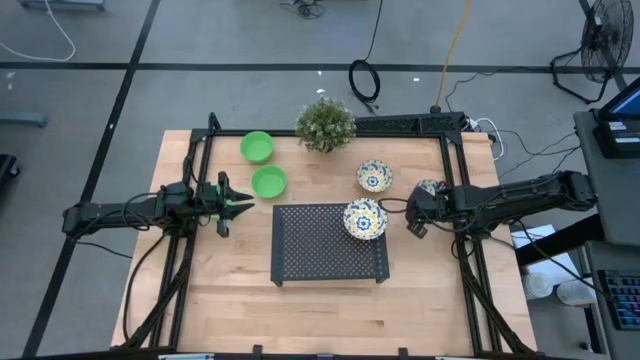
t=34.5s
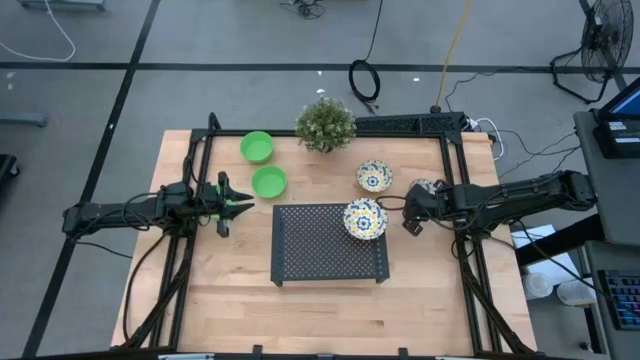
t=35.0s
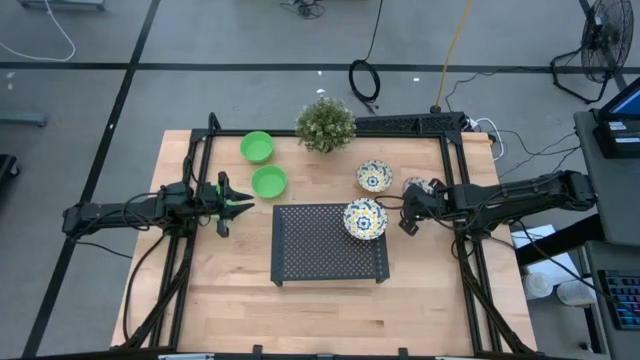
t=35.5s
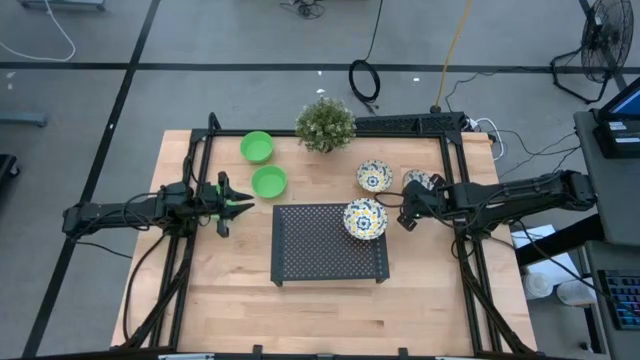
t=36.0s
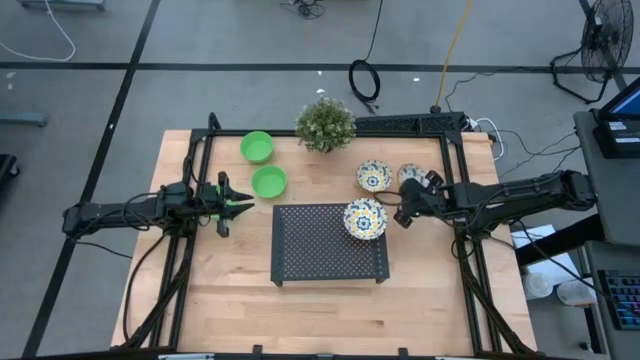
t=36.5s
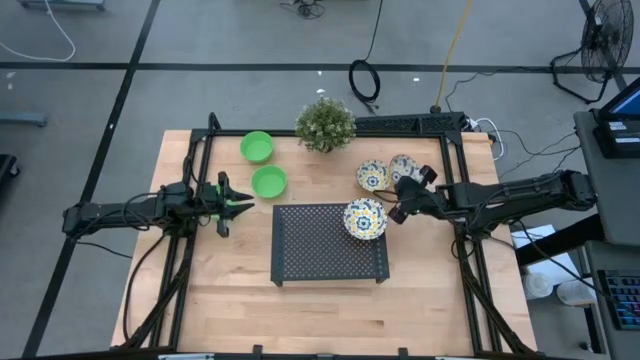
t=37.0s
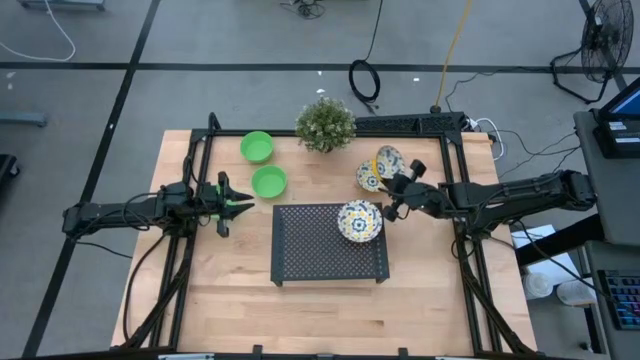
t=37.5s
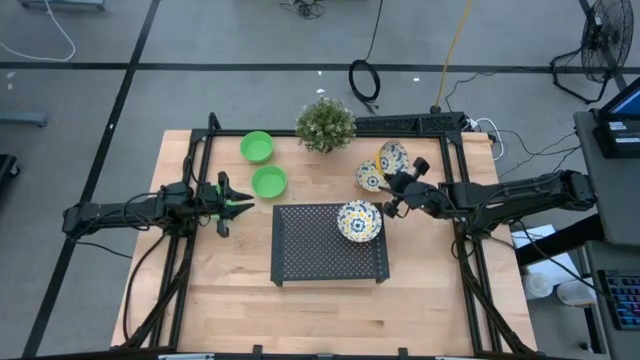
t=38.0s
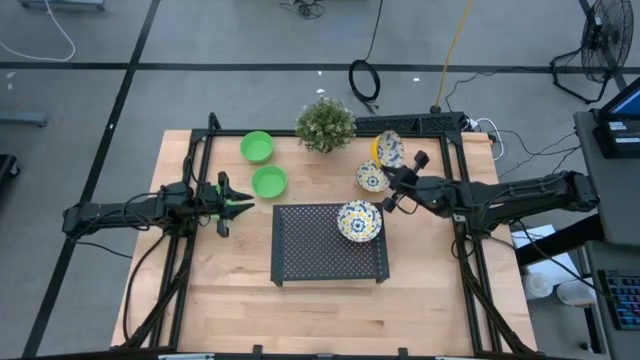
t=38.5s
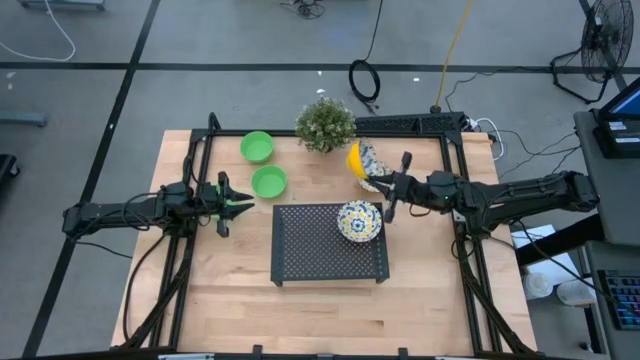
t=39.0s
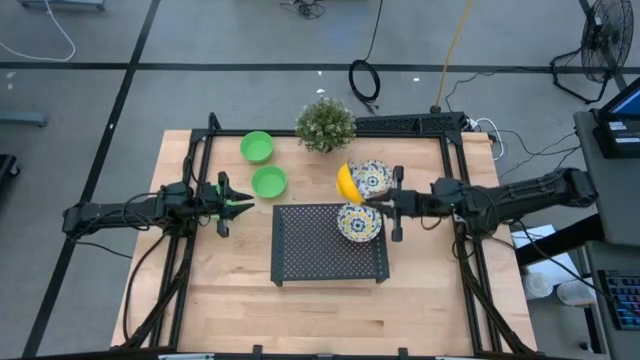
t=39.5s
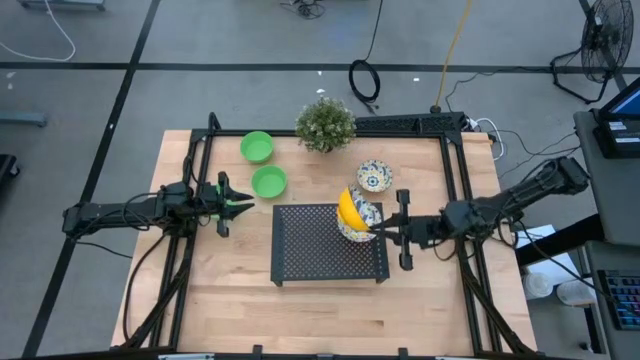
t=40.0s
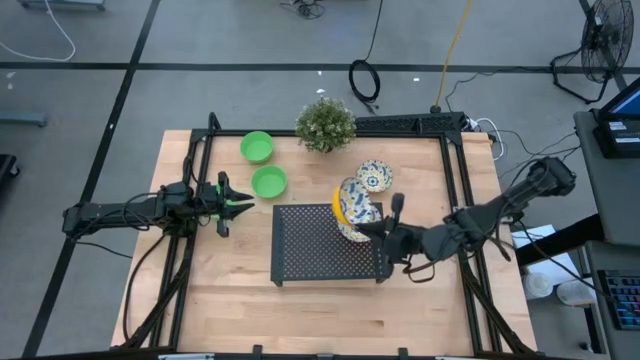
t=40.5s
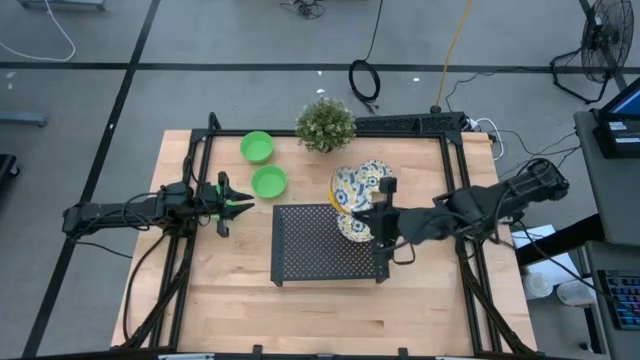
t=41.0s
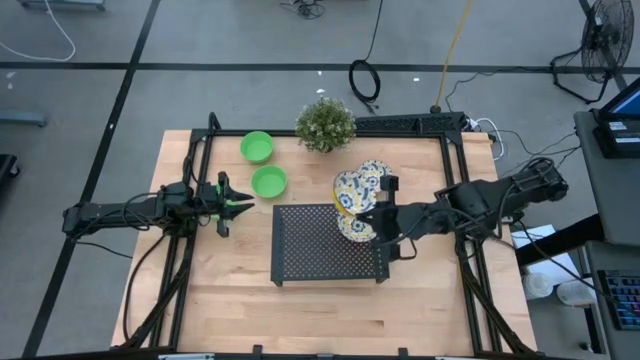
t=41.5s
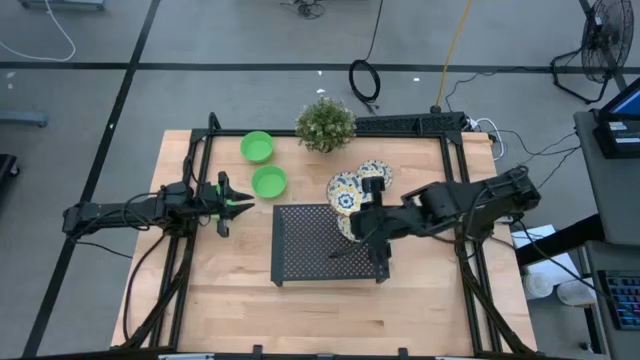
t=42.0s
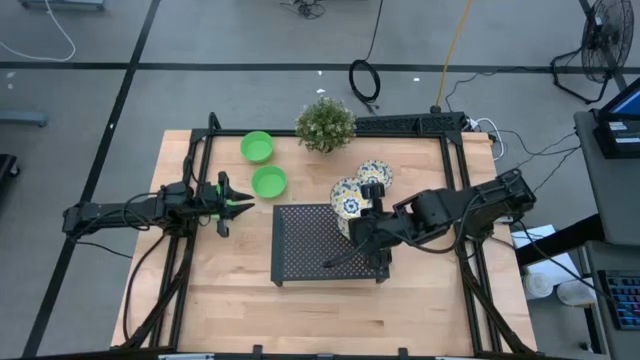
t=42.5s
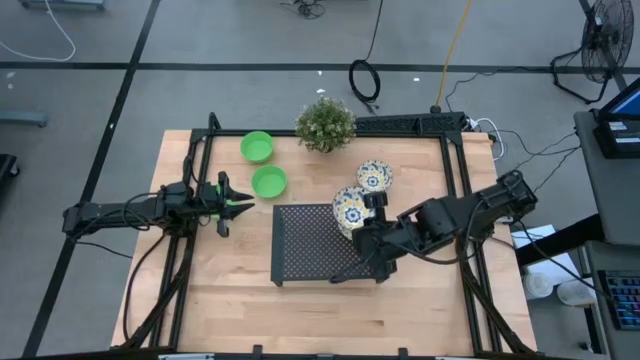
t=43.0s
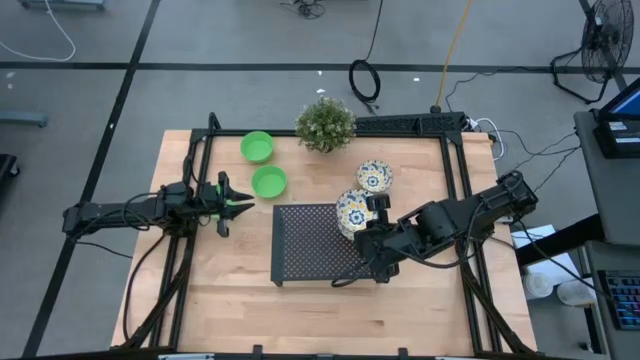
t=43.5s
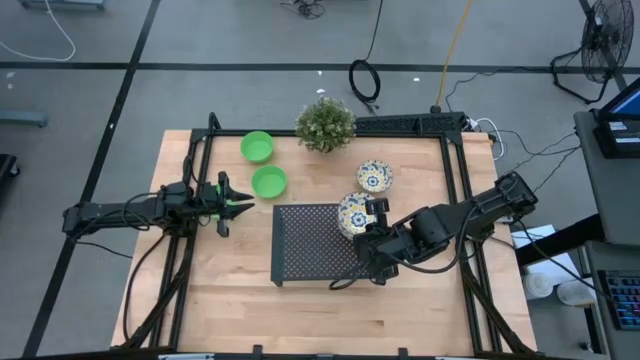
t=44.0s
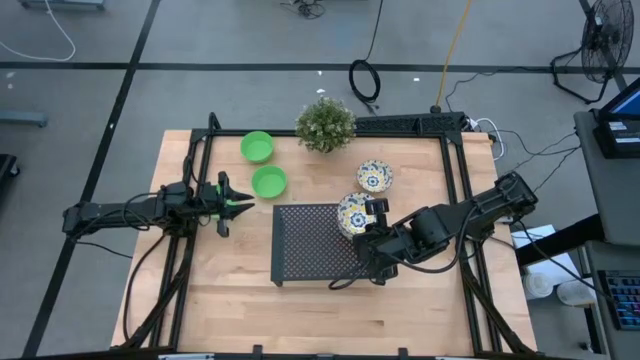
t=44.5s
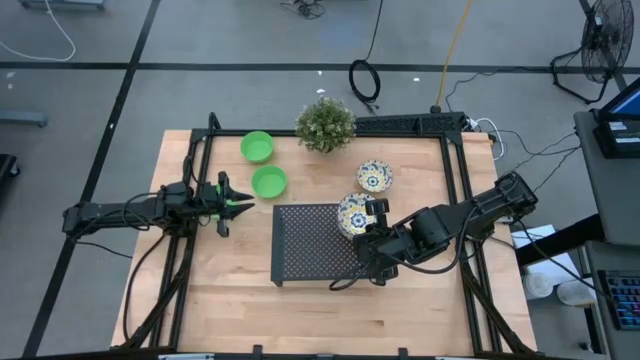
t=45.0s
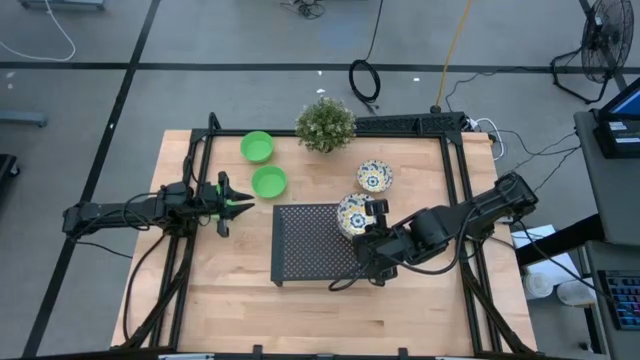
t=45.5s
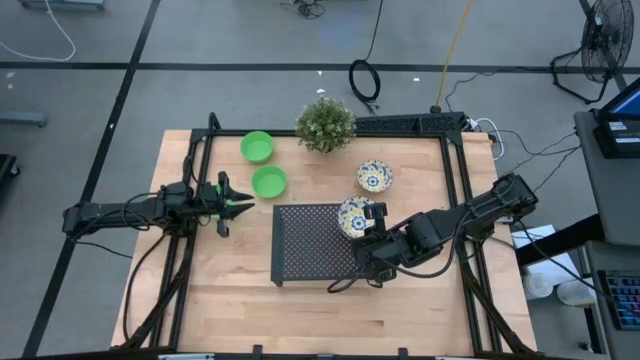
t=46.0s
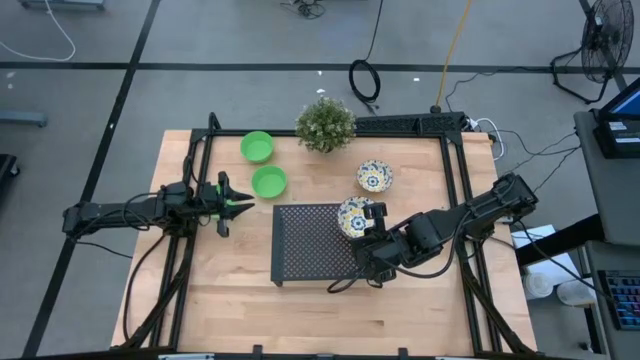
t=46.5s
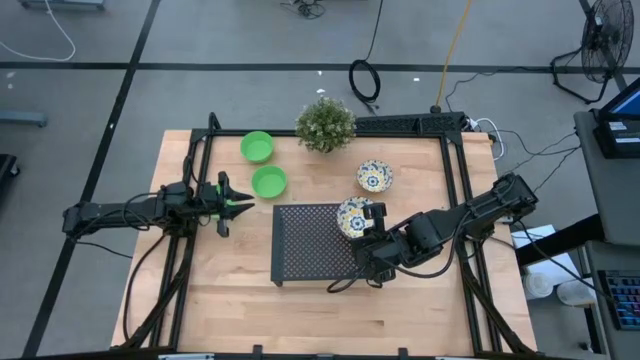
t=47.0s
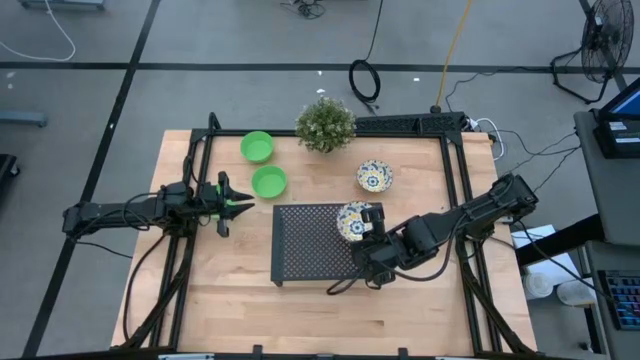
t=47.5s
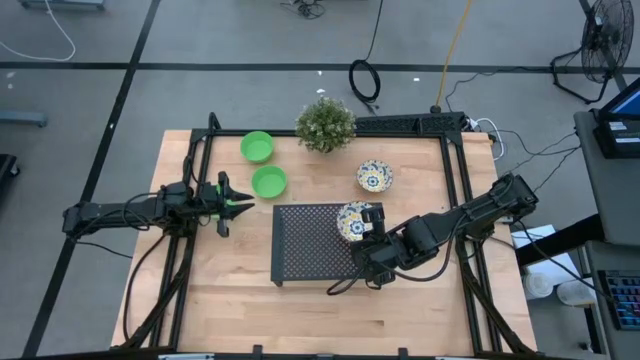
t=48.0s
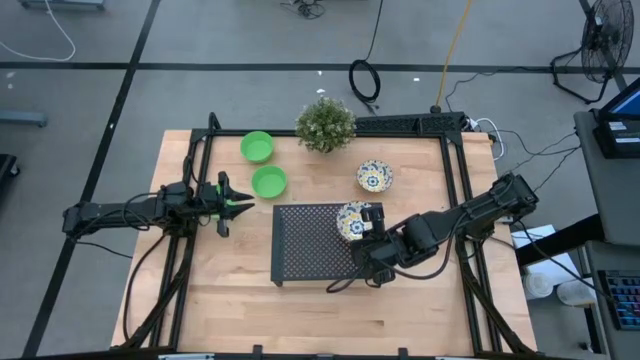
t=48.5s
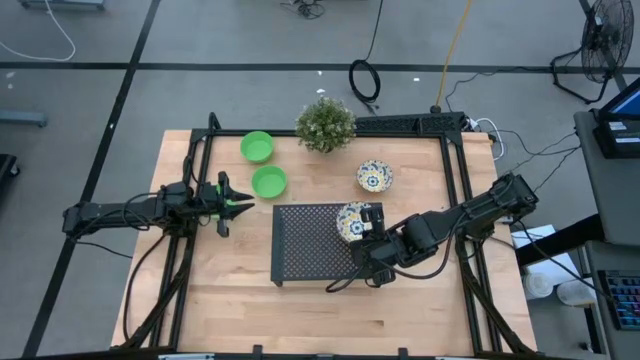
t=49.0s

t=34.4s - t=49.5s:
Task: Pick & Place Mini bowls
Stack the right white patterned bowl on top of the white patterned bowl on the shelf

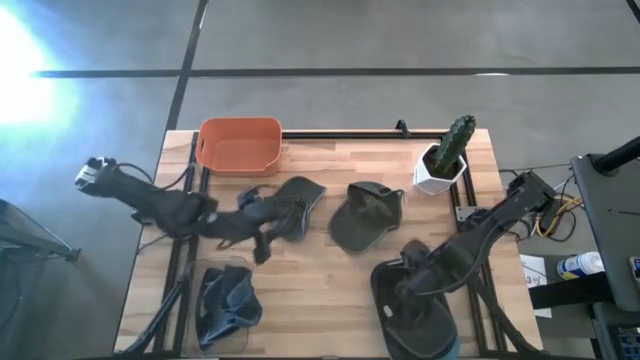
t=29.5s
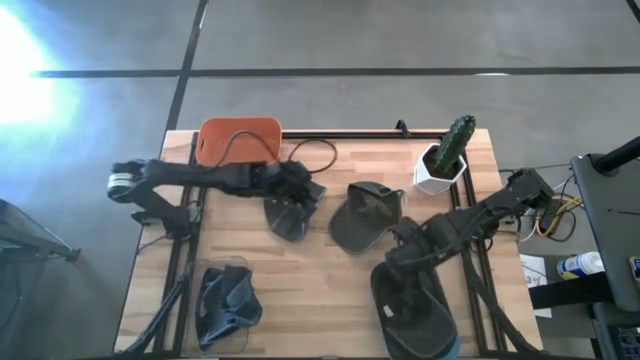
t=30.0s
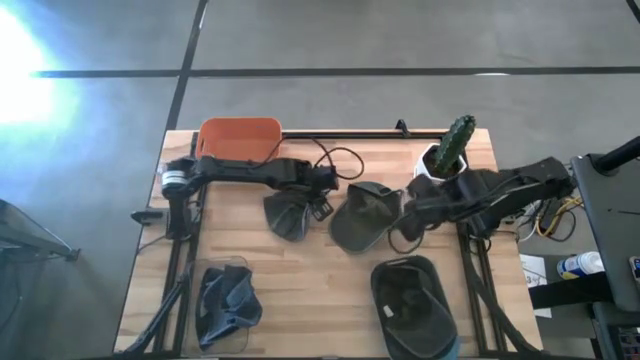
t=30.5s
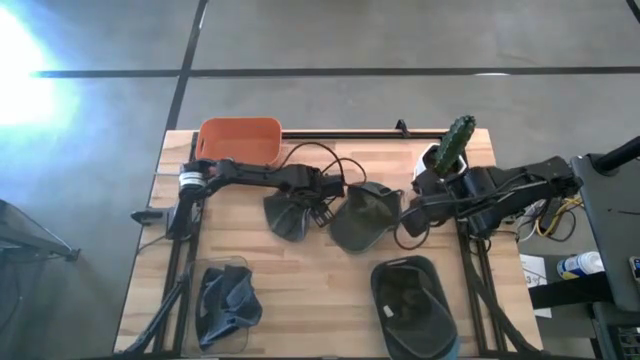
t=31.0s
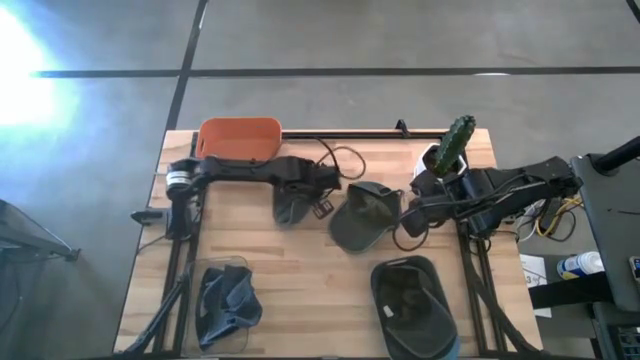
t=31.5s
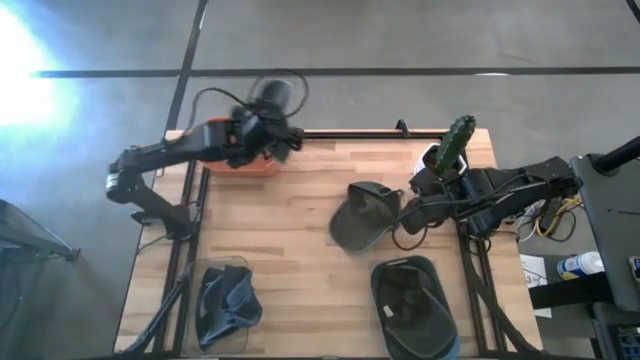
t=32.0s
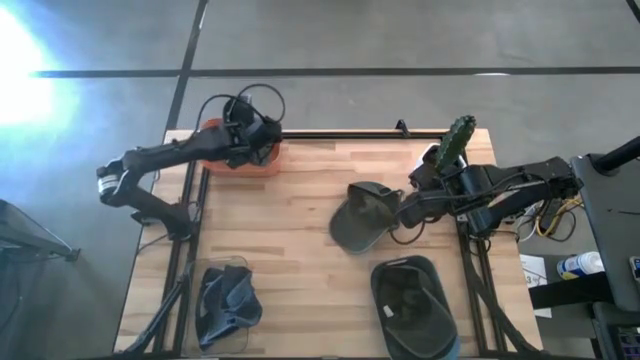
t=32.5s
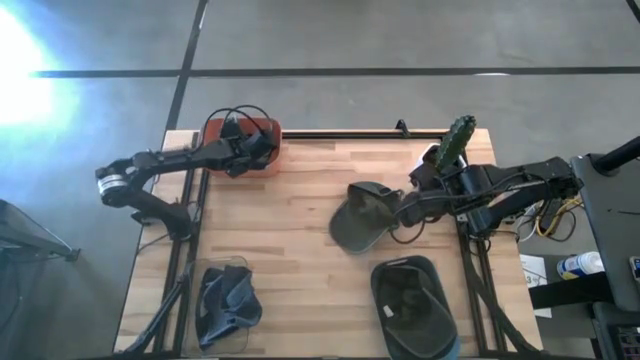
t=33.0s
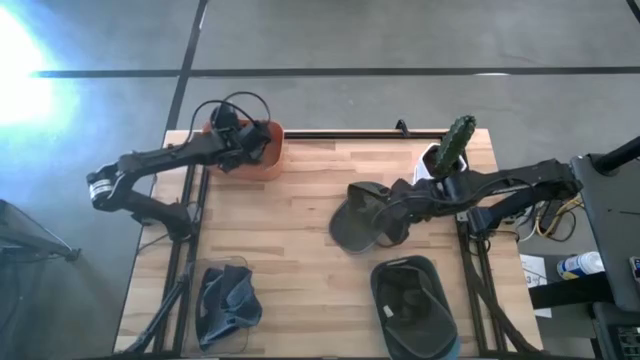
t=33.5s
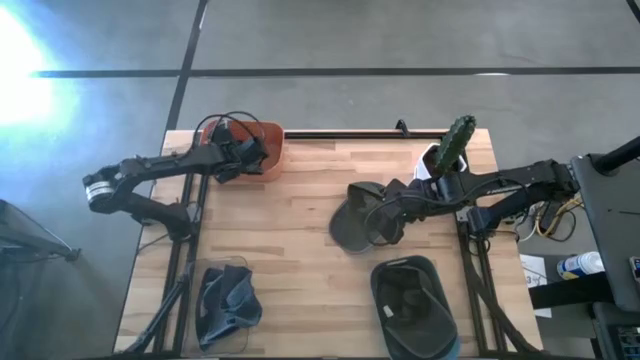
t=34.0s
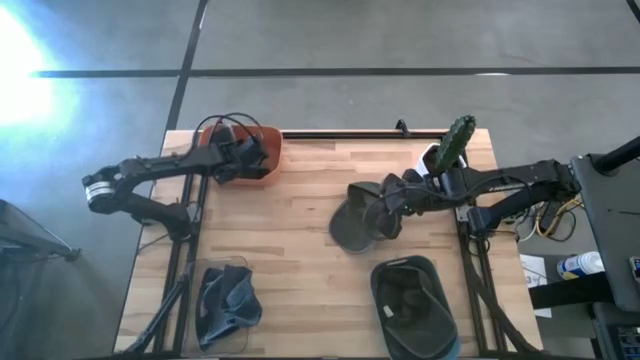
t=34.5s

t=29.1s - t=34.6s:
Task: Pick & Place hat
Put the left green cap into the orange bin
